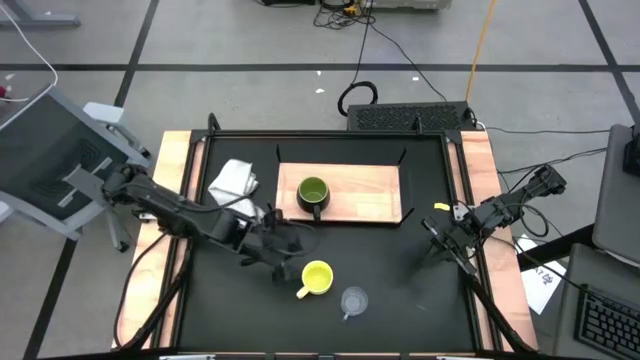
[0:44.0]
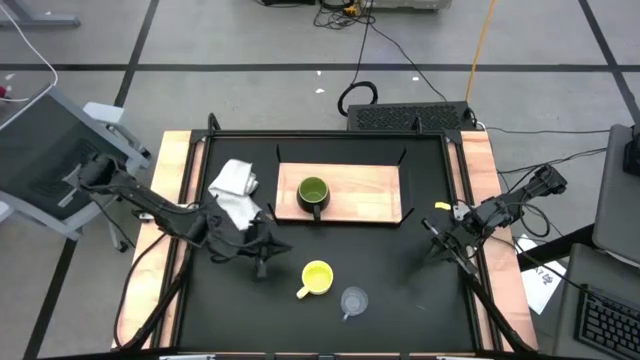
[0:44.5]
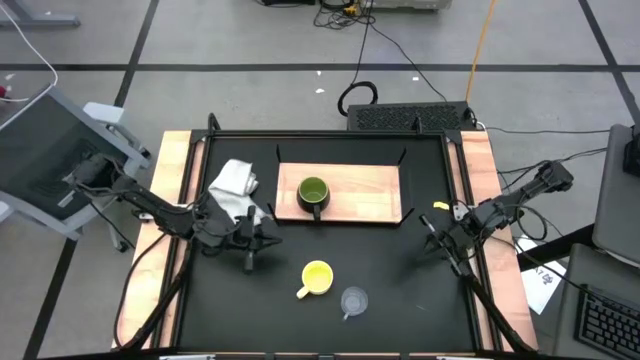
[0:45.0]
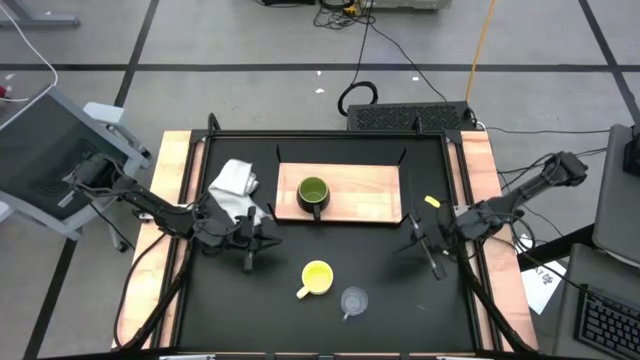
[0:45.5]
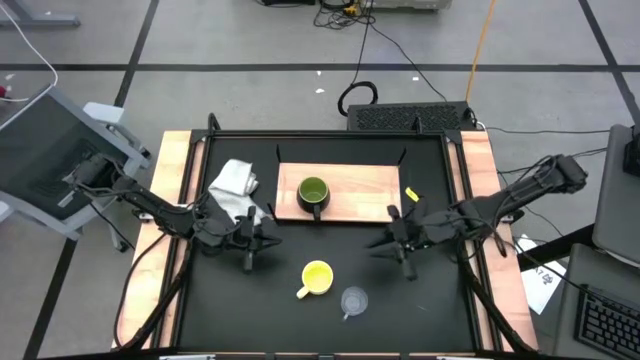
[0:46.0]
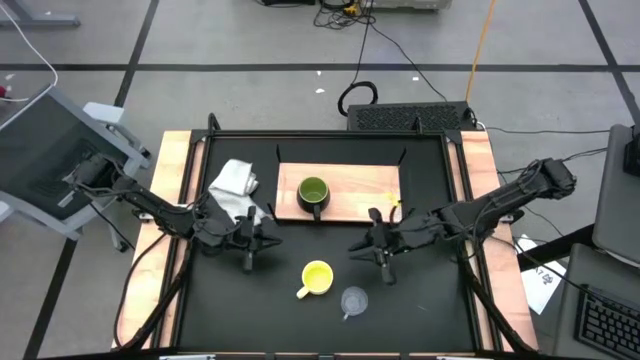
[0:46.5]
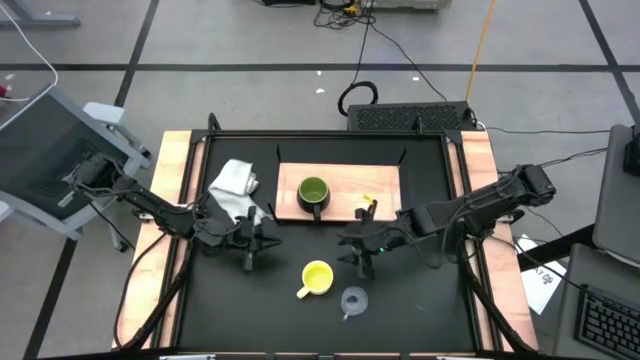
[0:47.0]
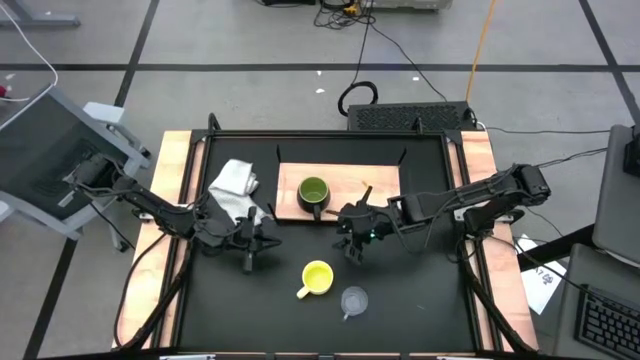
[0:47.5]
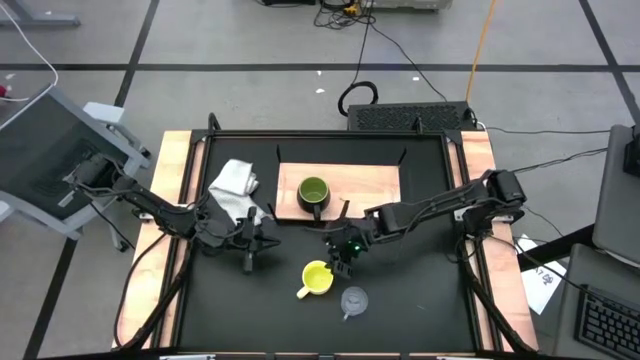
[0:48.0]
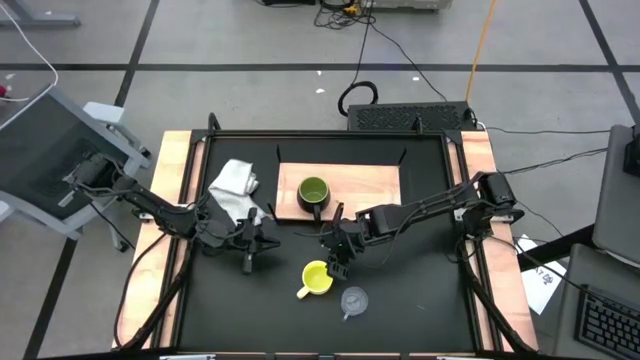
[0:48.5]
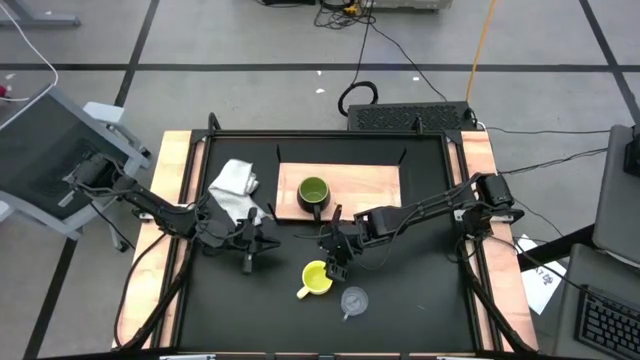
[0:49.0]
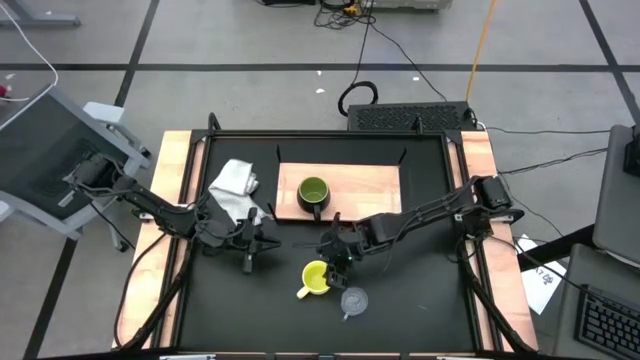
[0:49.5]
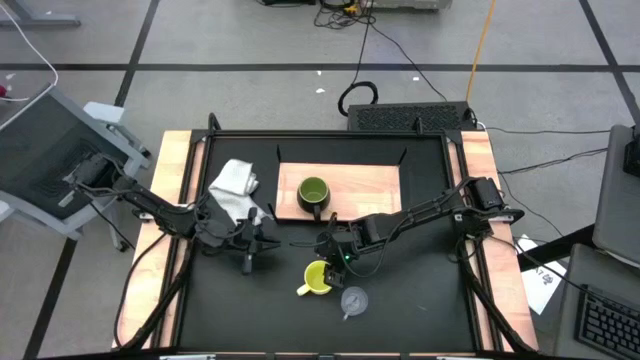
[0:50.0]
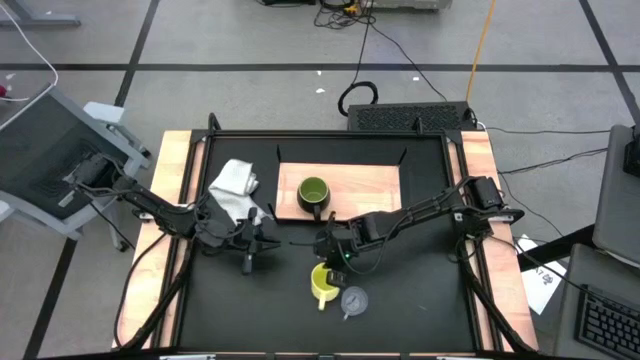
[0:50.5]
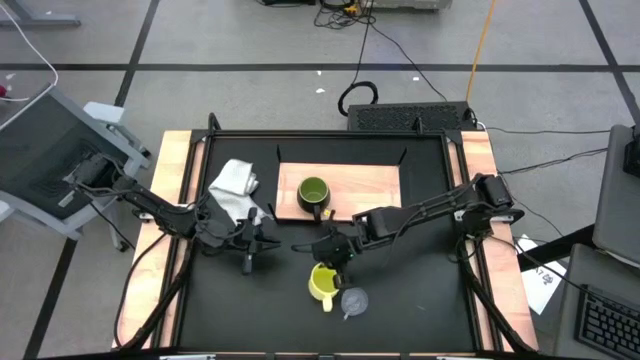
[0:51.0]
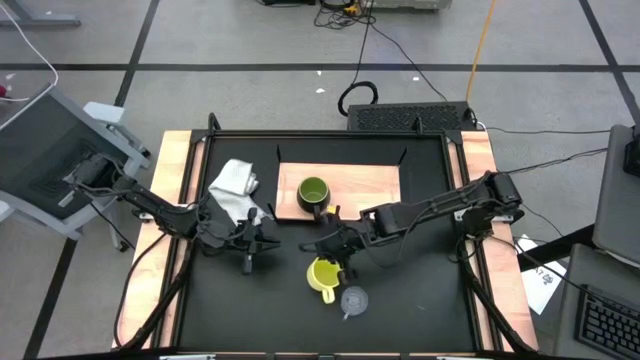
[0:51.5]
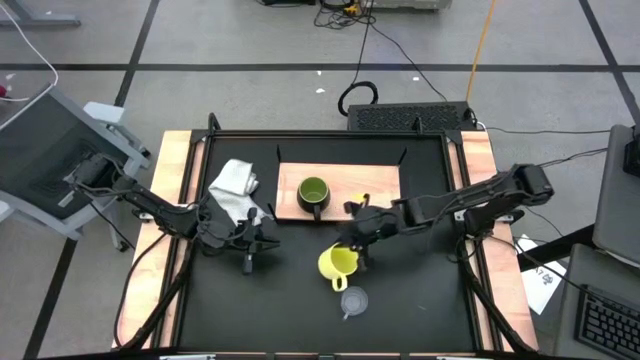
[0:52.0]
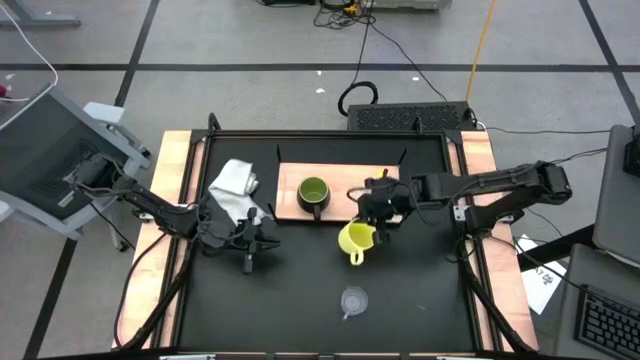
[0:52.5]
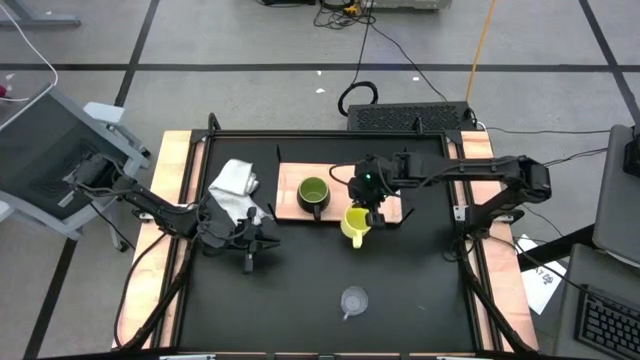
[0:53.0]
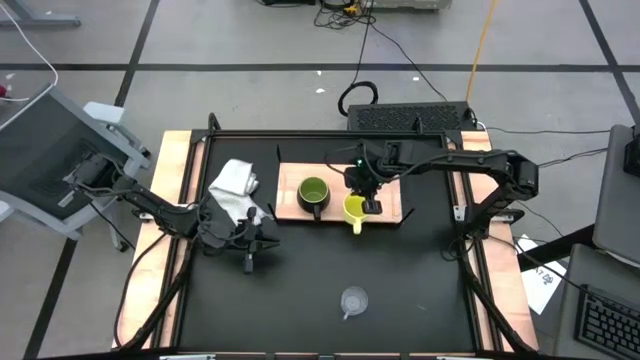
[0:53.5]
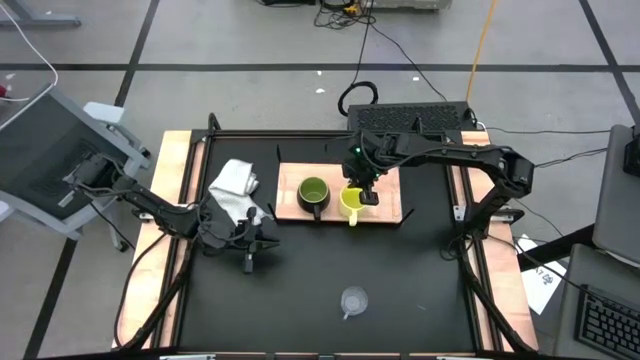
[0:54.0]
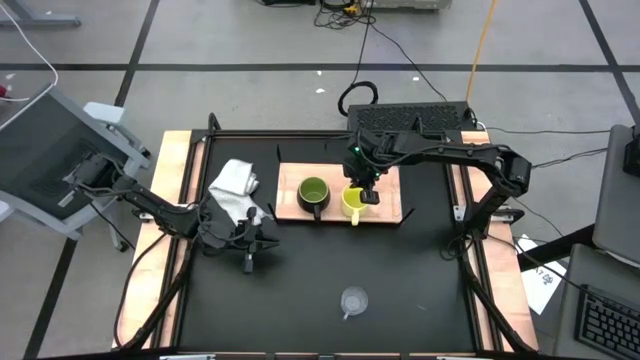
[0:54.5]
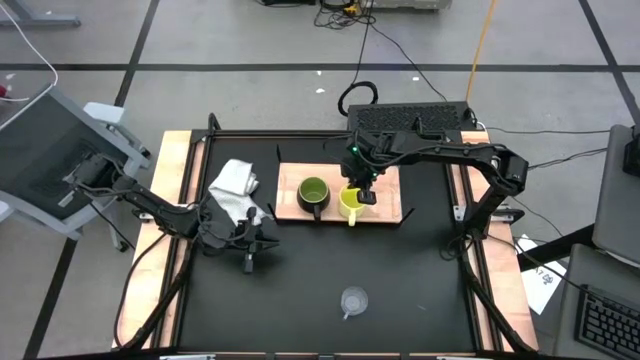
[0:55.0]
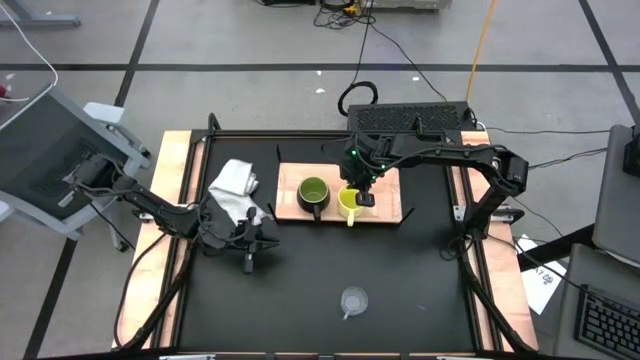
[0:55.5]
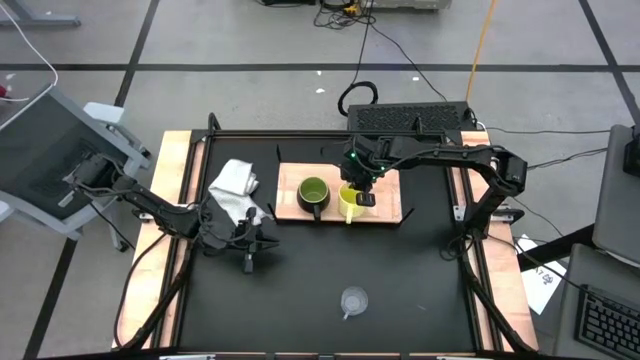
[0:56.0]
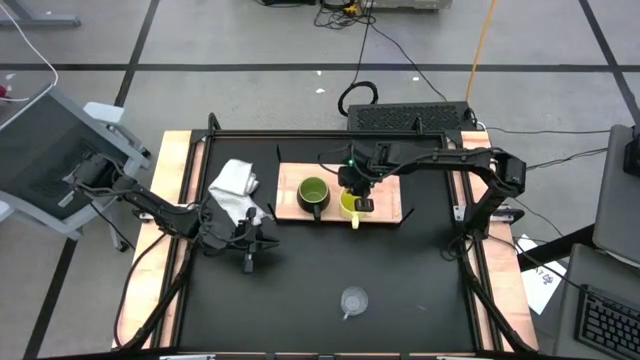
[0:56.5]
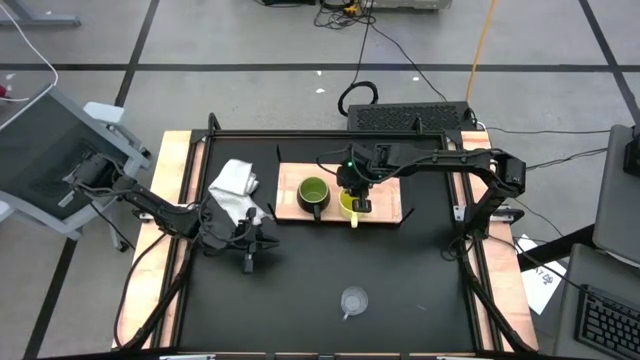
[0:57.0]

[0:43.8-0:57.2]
Task: Stack small to large cups/mugs on shelf
Put the yellow mug on the shelf

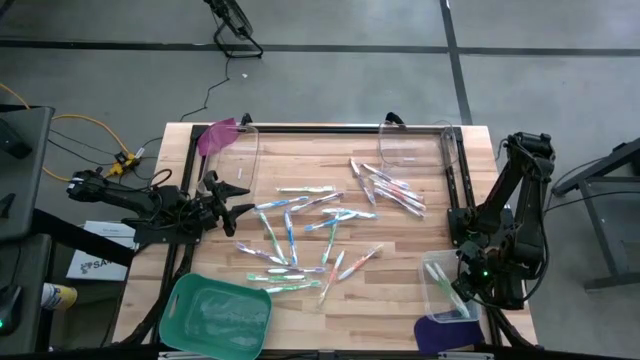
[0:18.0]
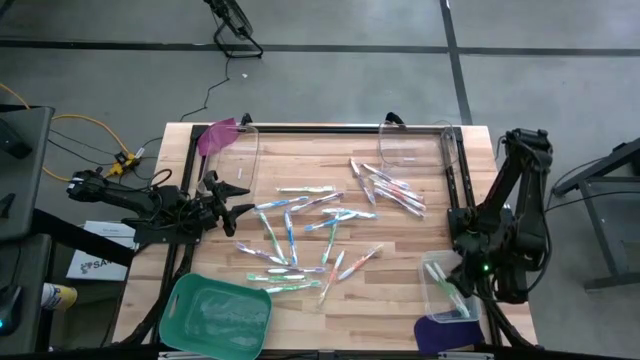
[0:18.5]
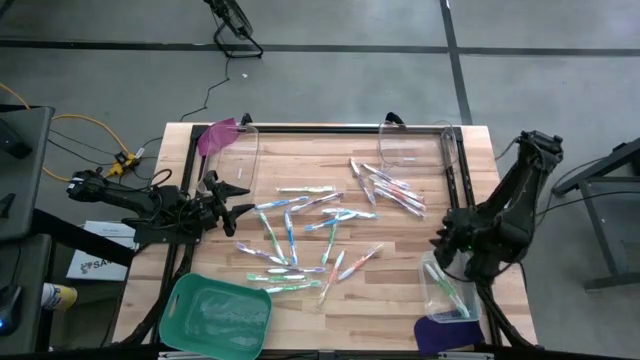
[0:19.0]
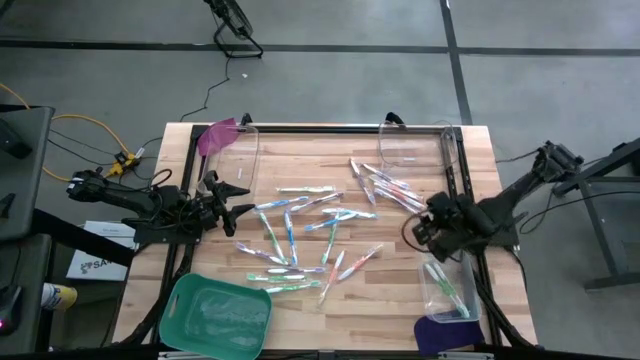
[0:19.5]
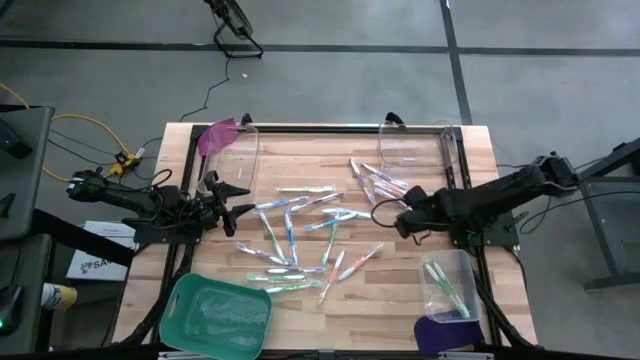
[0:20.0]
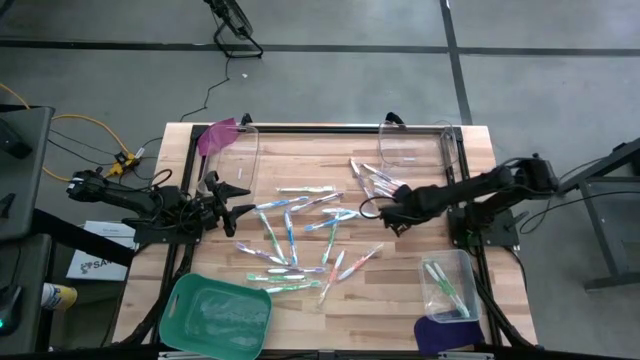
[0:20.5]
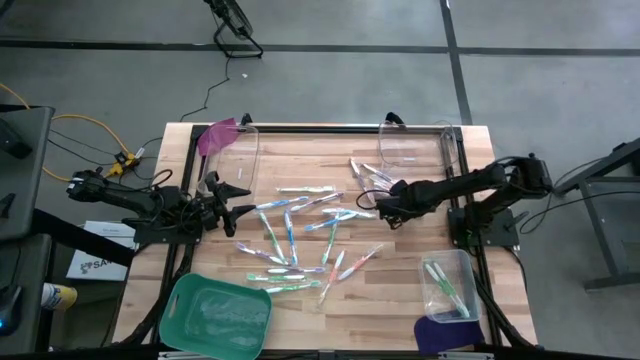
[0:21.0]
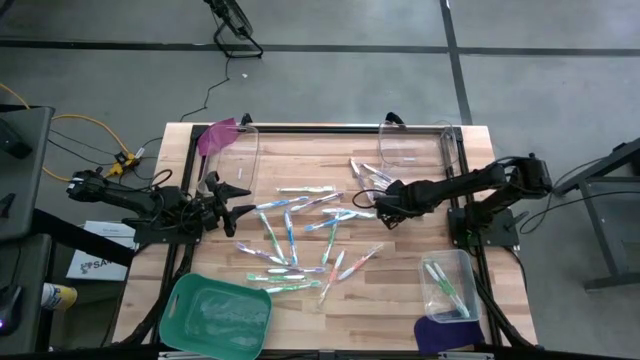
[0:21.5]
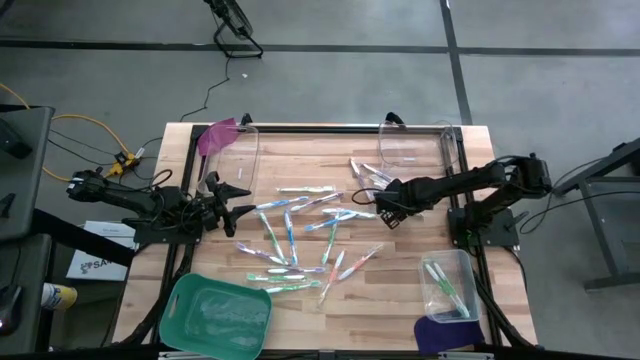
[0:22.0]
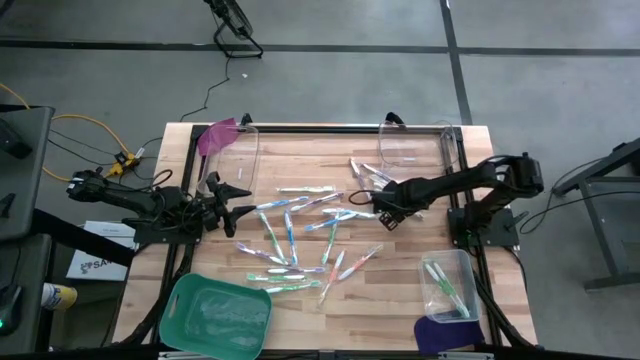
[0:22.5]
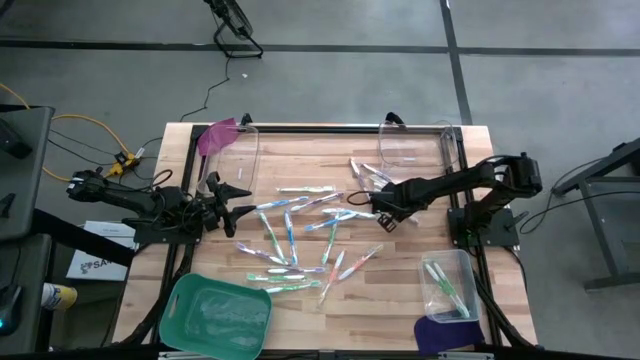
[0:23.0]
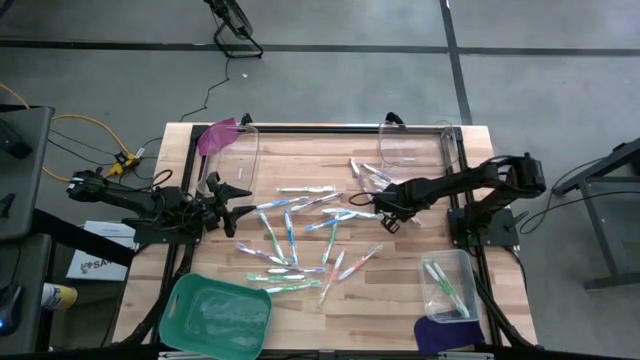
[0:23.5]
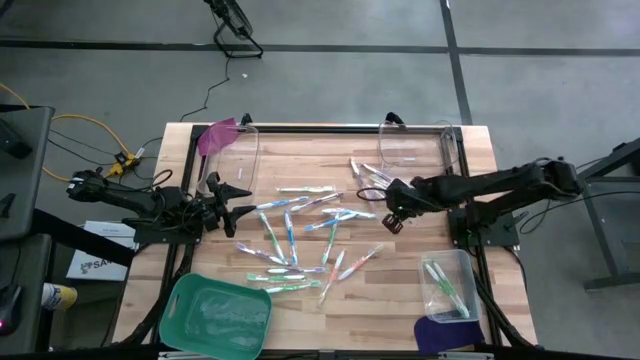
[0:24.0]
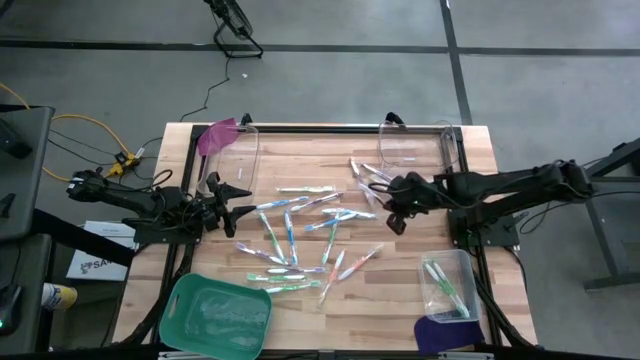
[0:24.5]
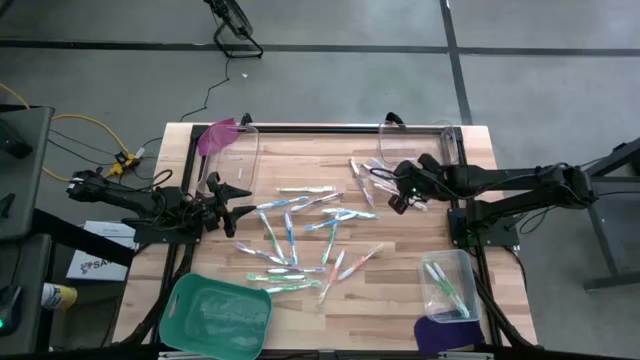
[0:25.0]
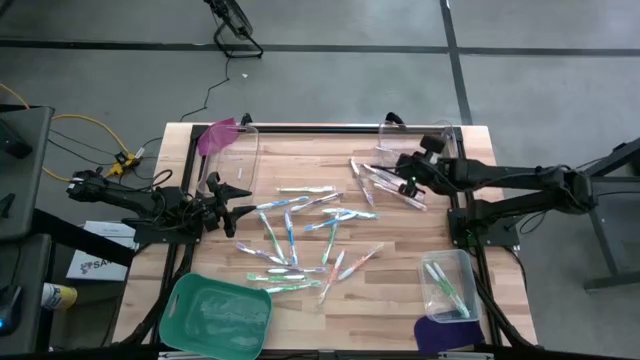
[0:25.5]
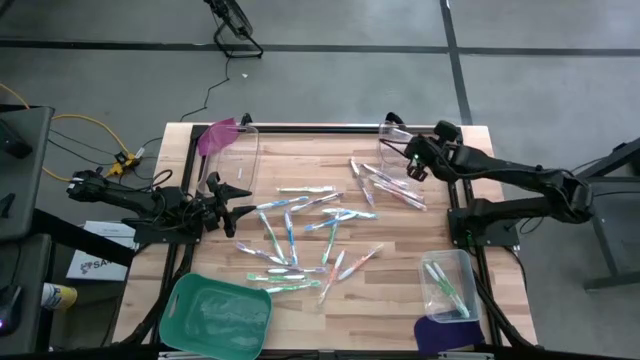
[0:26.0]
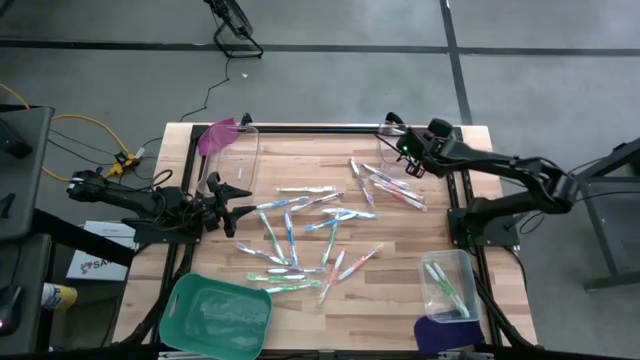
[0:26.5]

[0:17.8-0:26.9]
Task: Pick & Place Toothbrushes
Put the purple toothbrush into the right transparent bin
